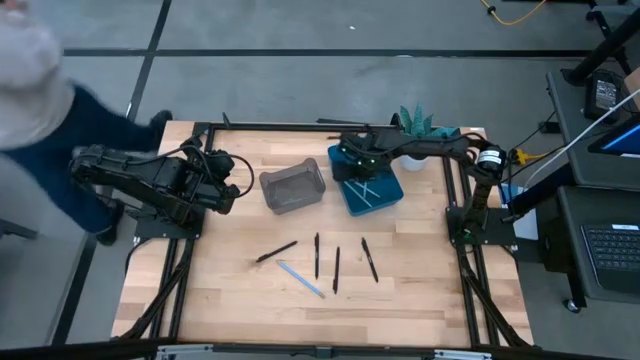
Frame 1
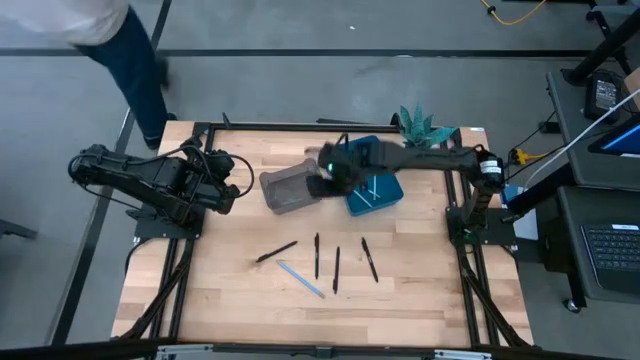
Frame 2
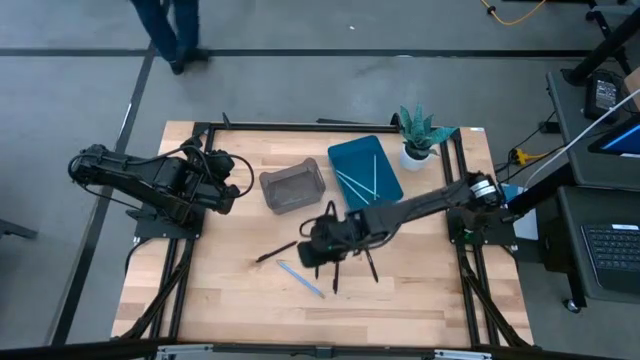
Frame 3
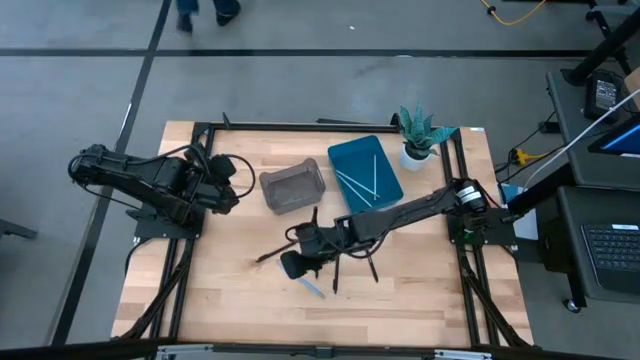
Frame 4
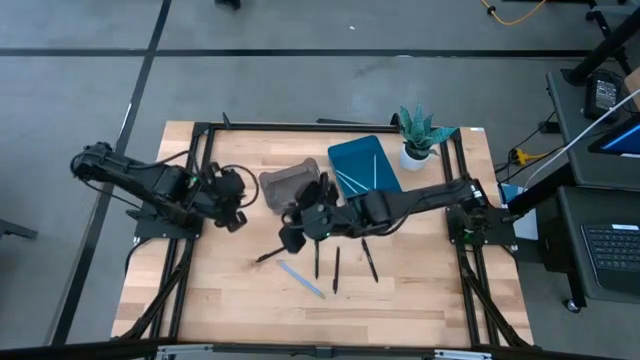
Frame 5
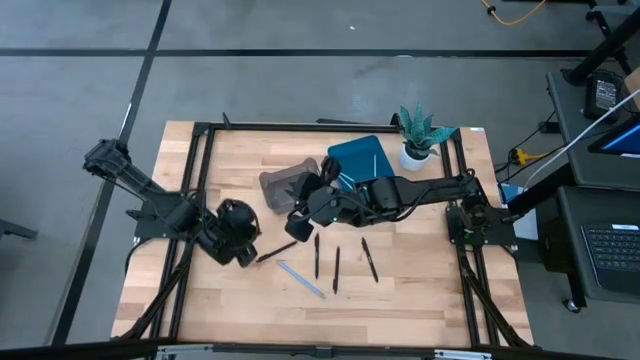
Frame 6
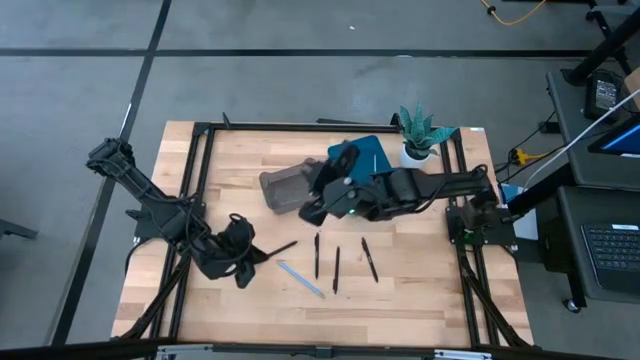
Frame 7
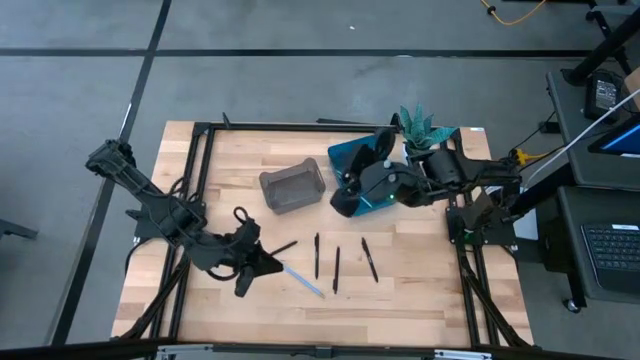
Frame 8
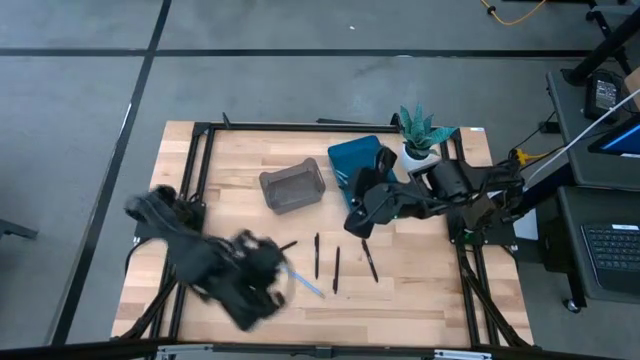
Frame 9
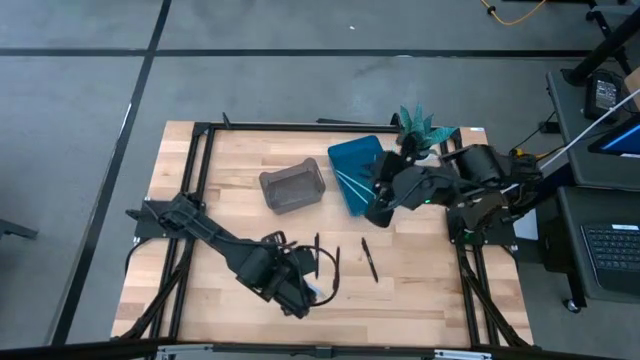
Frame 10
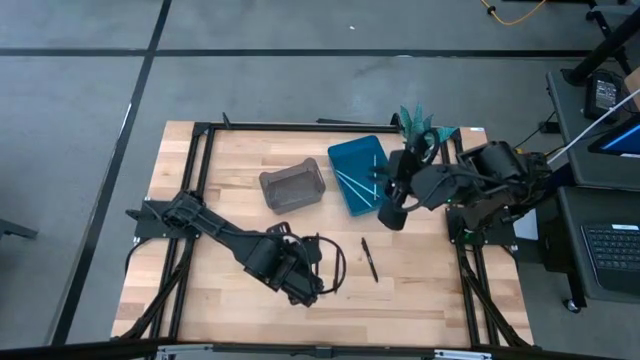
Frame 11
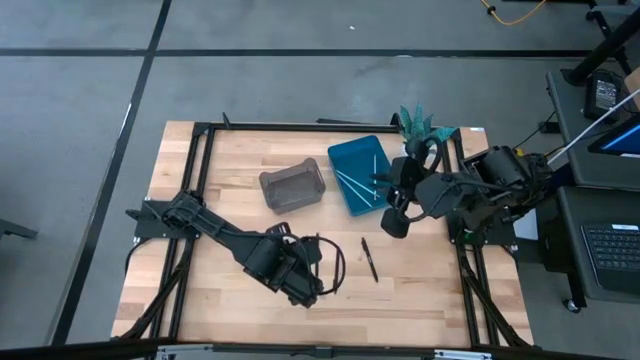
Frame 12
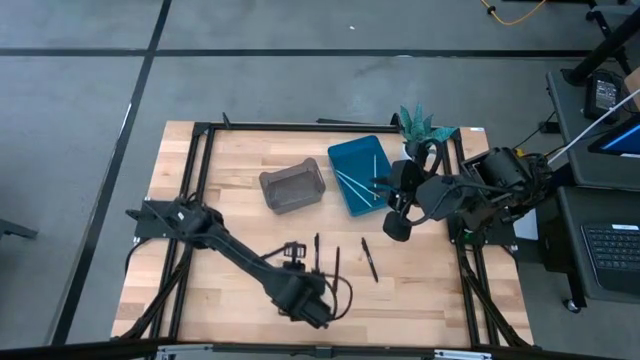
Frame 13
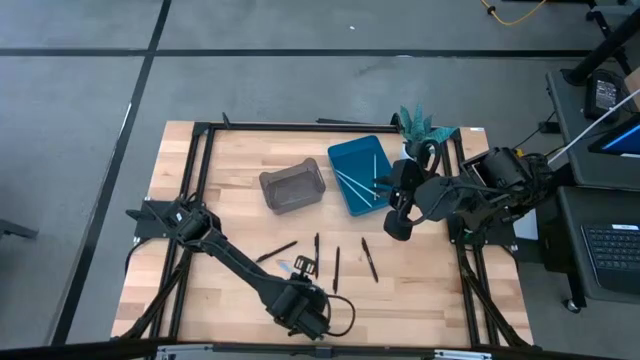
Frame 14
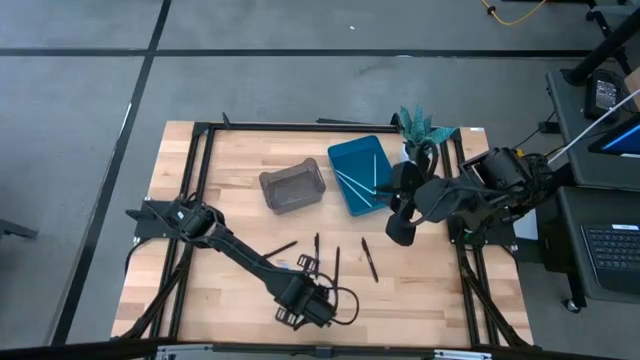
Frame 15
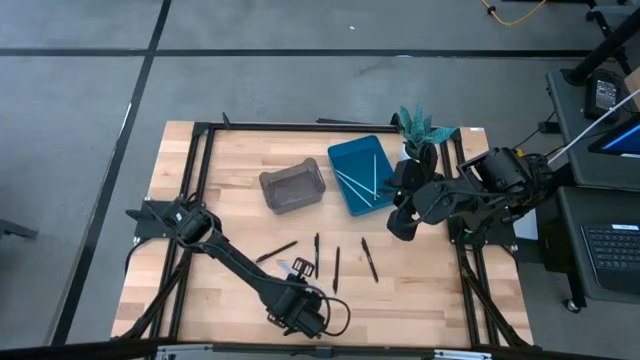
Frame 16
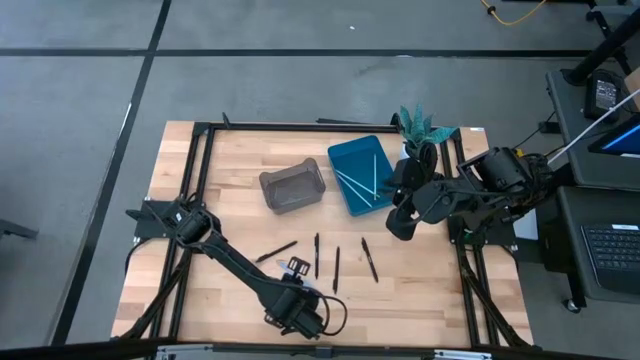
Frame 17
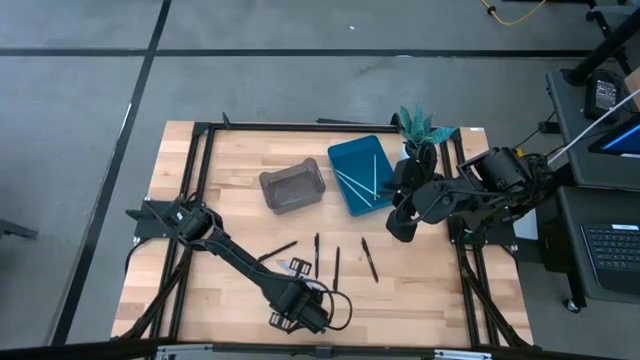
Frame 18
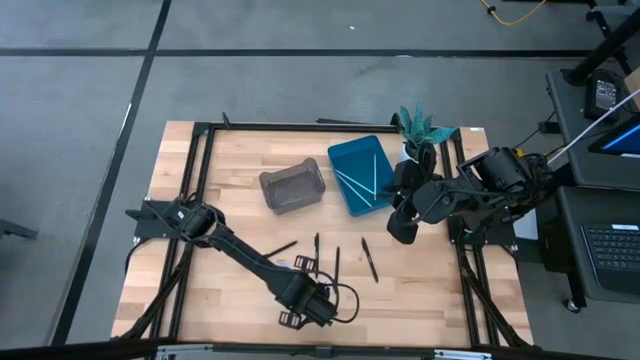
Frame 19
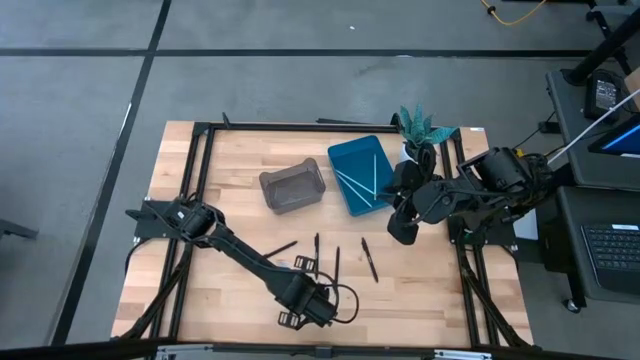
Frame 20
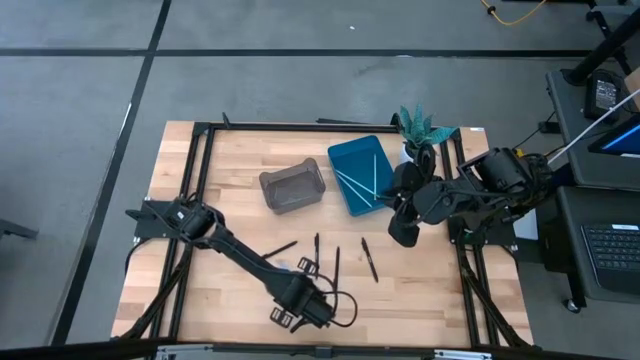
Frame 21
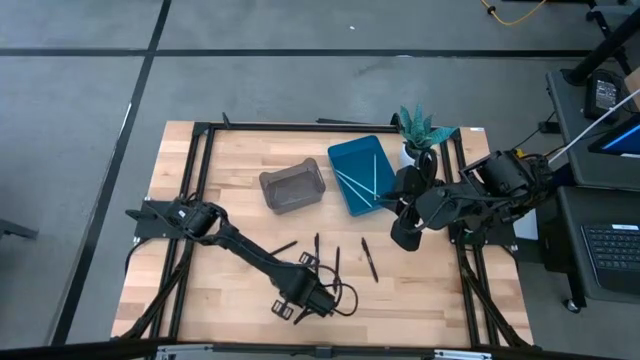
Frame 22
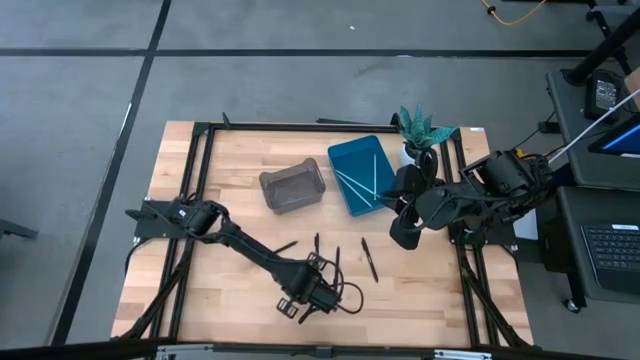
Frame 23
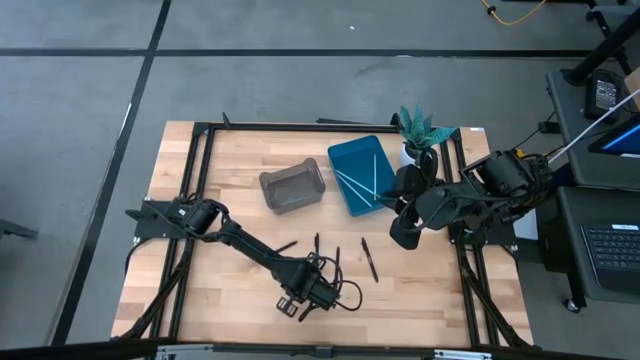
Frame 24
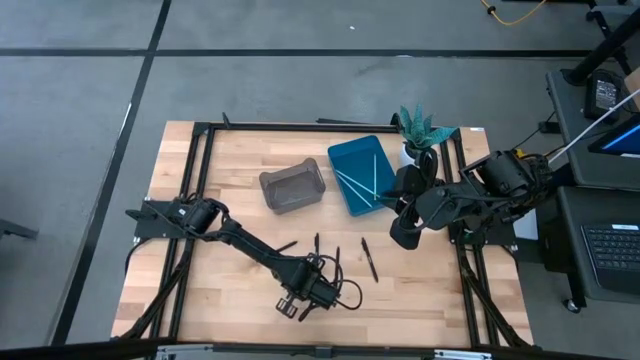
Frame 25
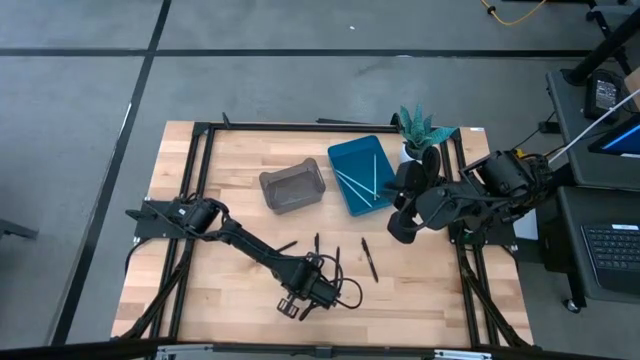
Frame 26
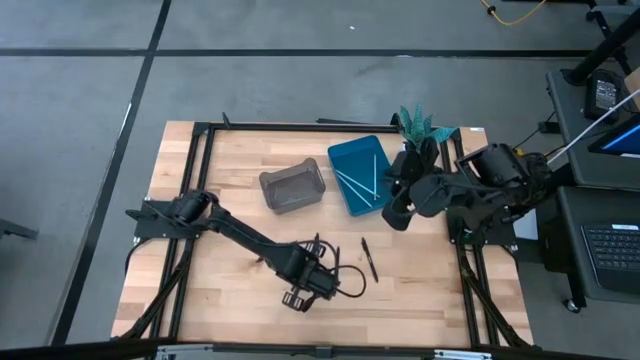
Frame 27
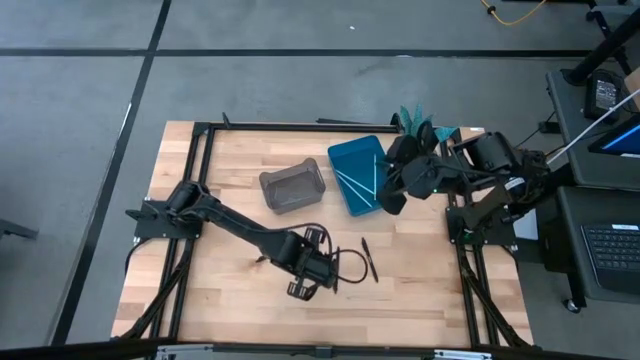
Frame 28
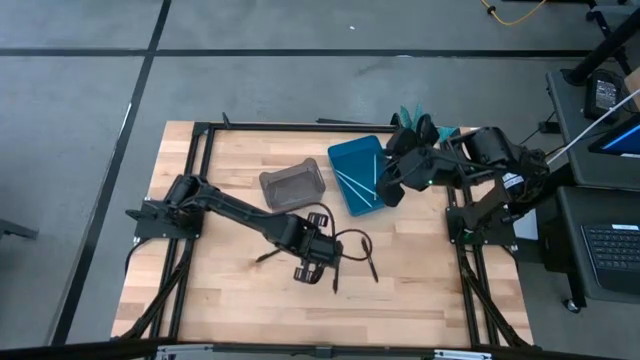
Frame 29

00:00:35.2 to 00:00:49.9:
Task: Sort pens & pencils
Put the blue colored pencil into the blue bin

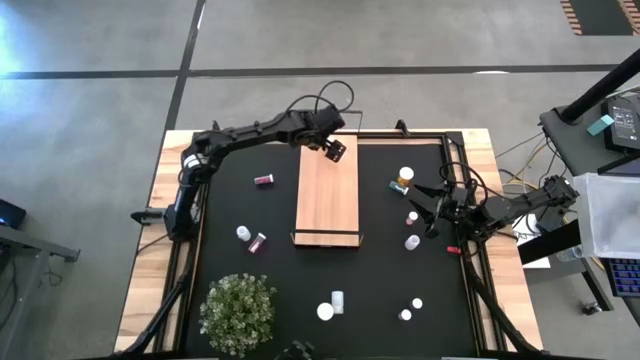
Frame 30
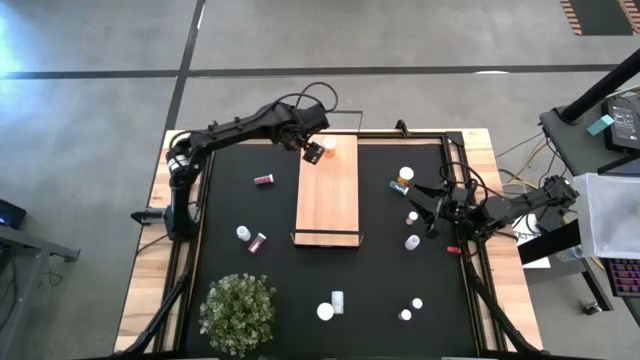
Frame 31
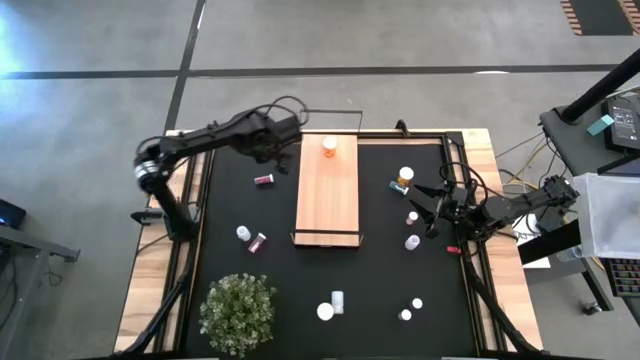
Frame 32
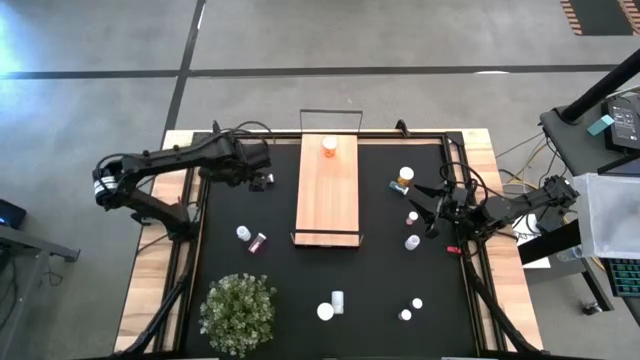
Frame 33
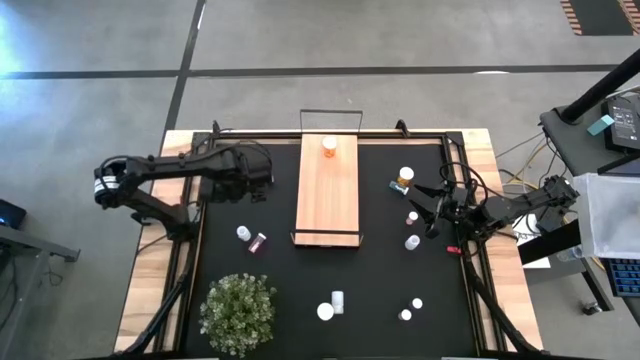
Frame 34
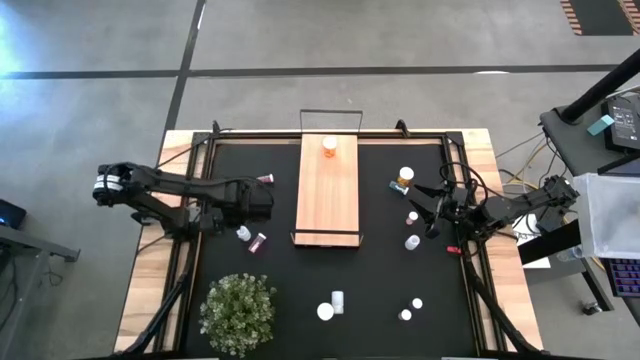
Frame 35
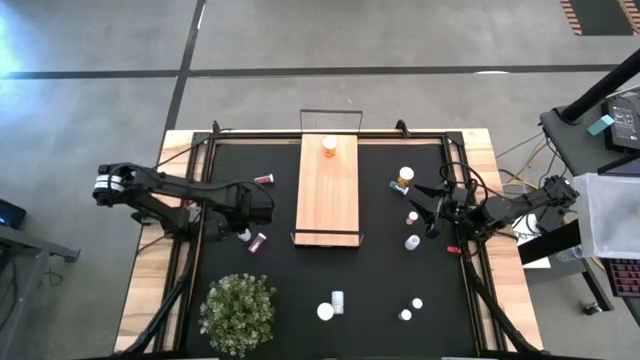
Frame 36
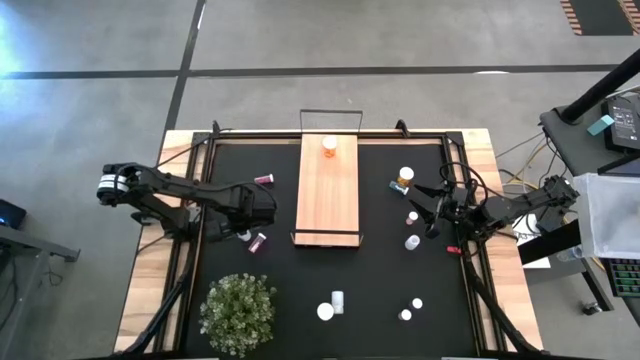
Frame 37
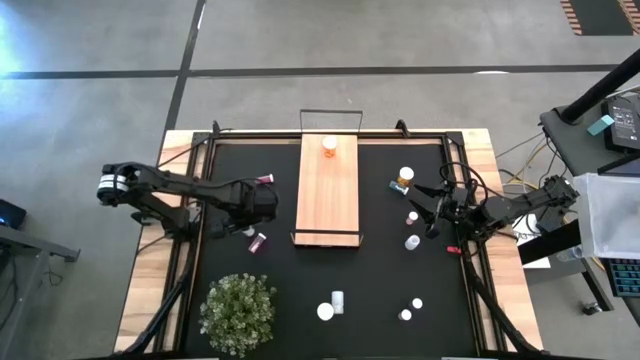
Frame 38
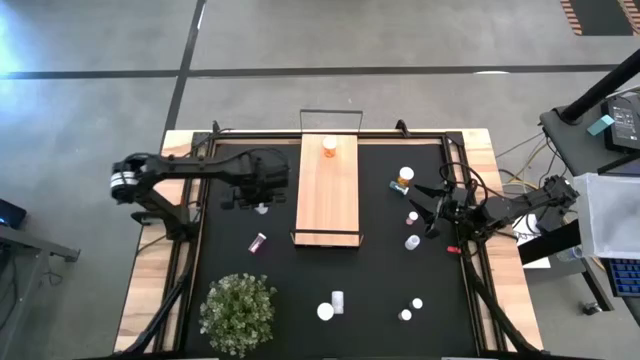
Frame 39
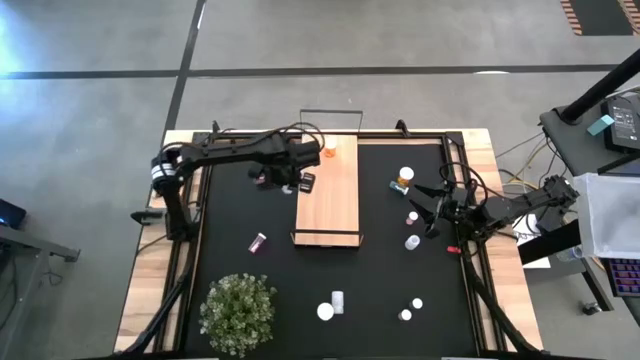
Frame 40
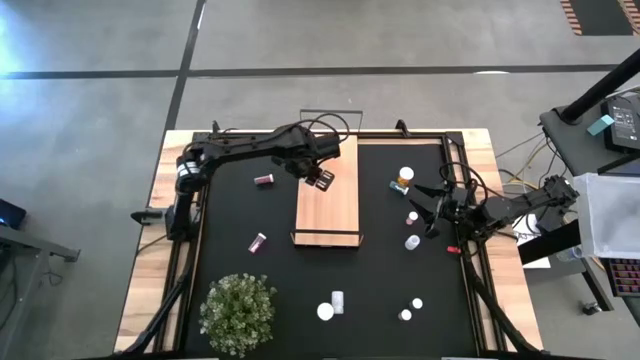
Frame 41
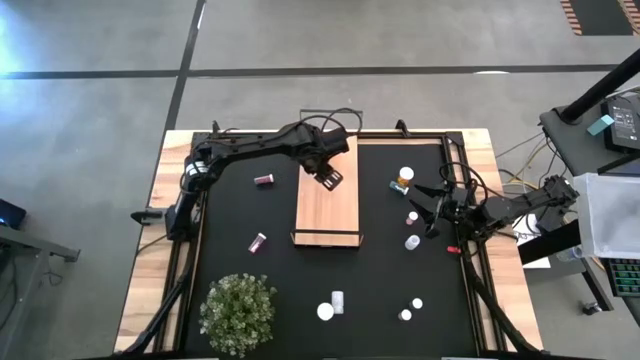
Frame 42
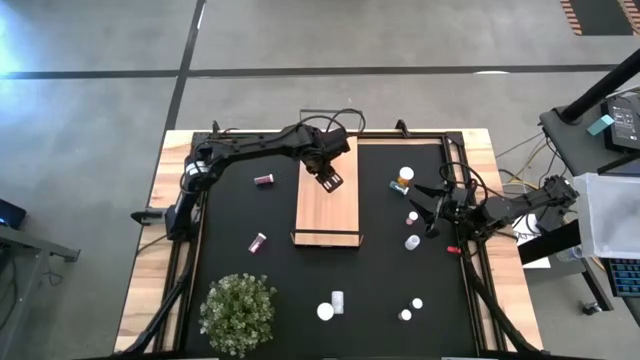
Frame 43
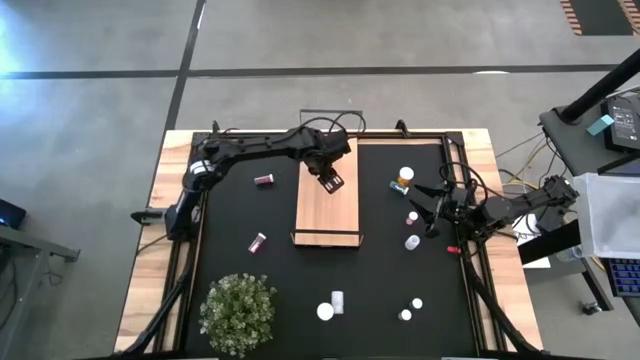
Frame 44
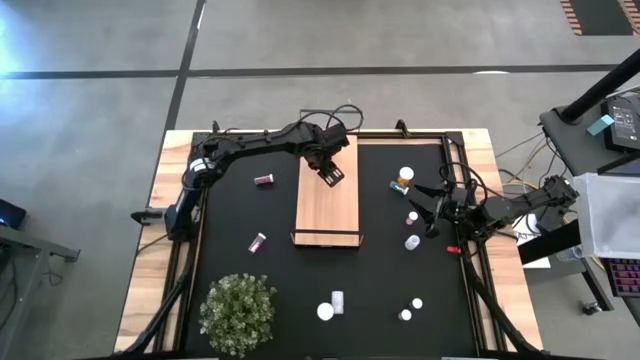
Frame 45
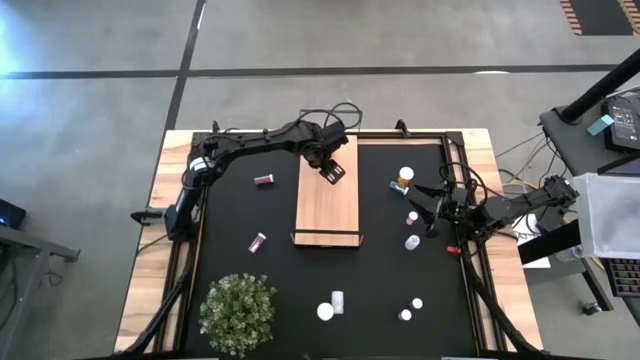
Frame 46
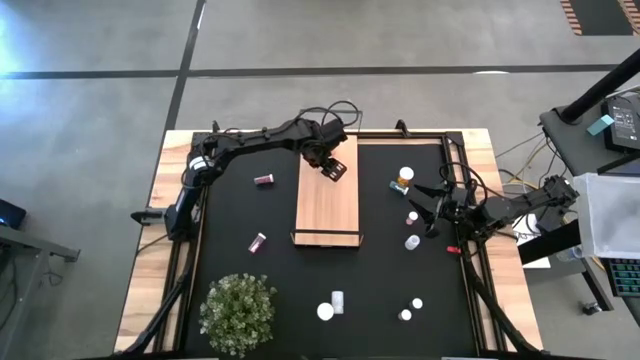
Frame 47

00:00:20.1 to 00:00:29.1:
Task: Pick and place medicine bottles onto shelf by color
Put the top left white pill bottle on the shelf
